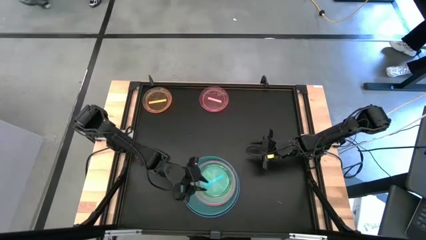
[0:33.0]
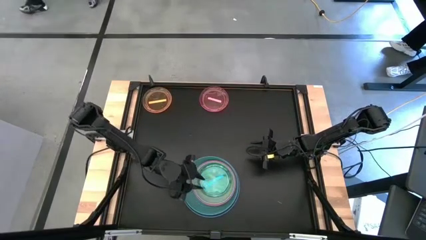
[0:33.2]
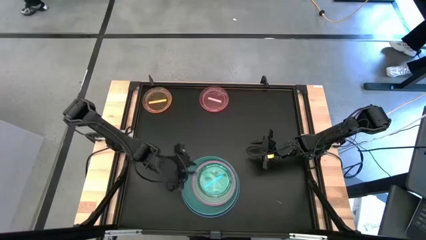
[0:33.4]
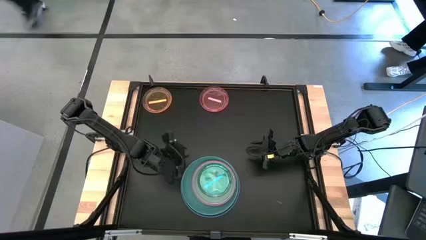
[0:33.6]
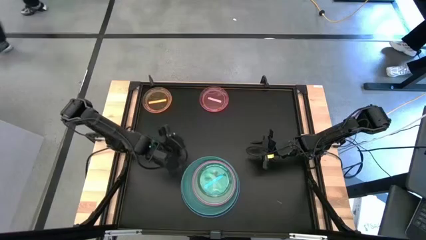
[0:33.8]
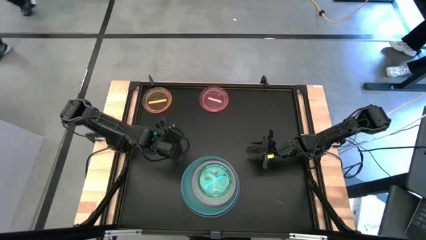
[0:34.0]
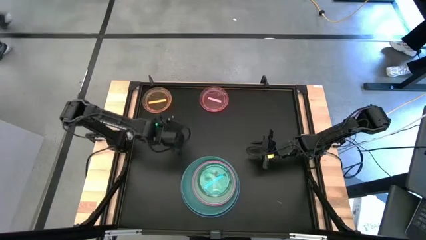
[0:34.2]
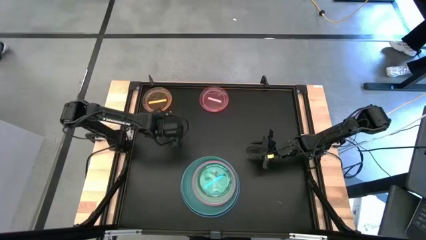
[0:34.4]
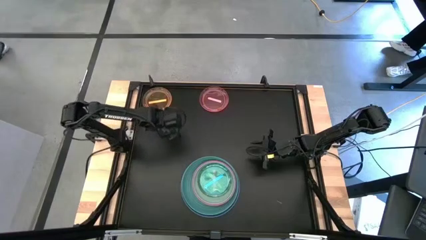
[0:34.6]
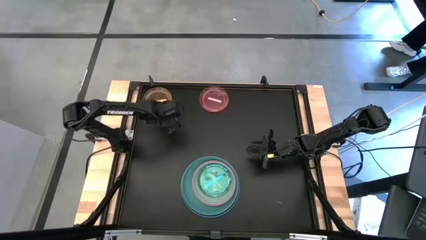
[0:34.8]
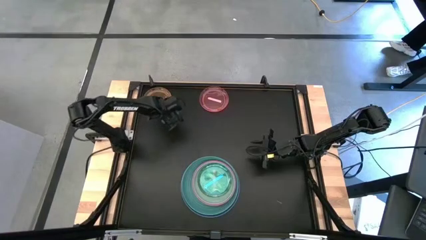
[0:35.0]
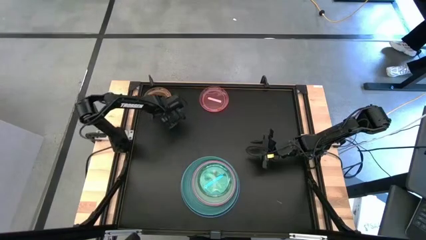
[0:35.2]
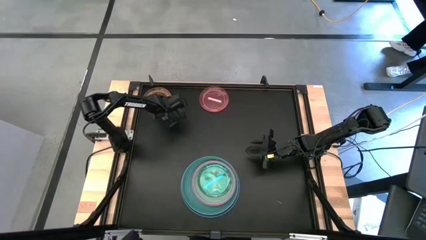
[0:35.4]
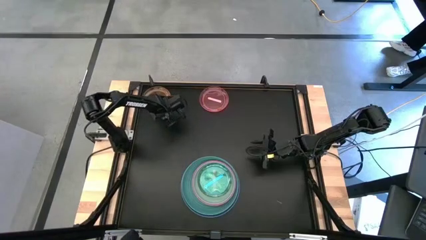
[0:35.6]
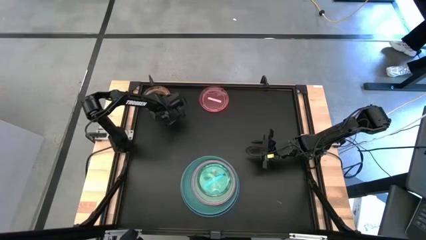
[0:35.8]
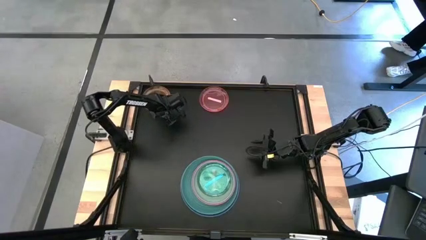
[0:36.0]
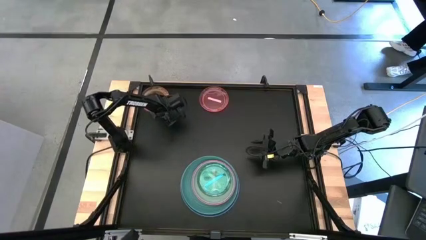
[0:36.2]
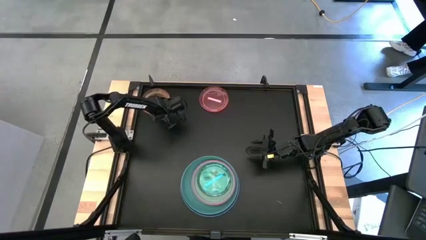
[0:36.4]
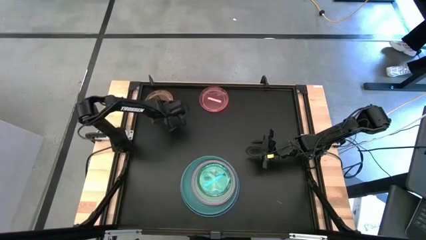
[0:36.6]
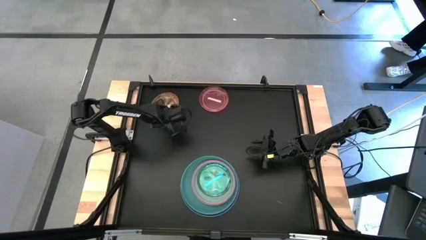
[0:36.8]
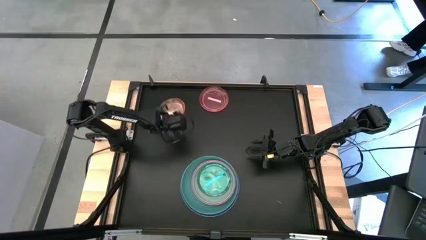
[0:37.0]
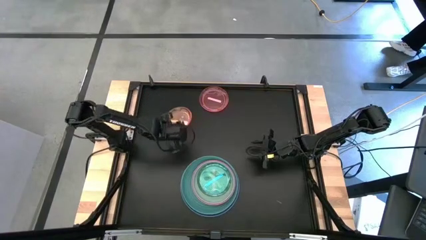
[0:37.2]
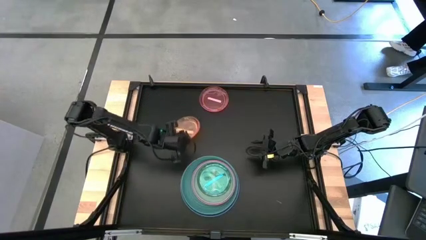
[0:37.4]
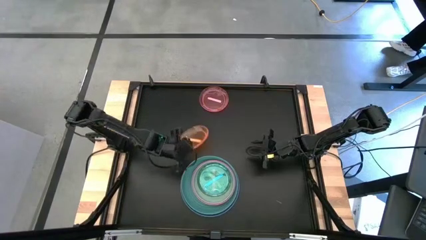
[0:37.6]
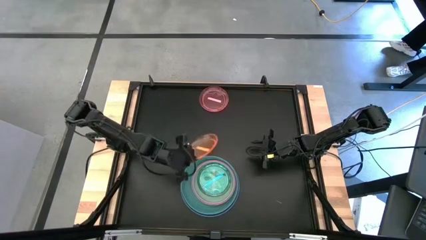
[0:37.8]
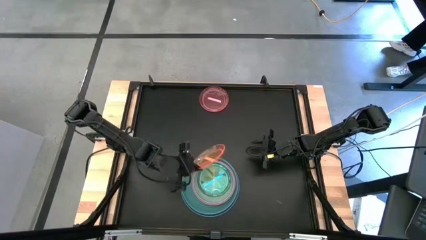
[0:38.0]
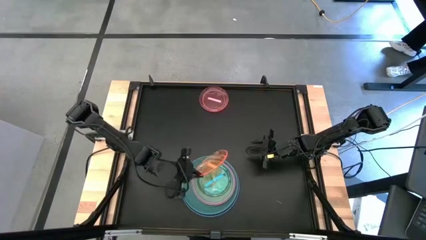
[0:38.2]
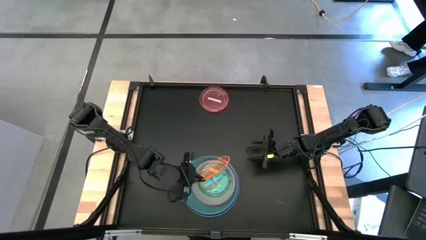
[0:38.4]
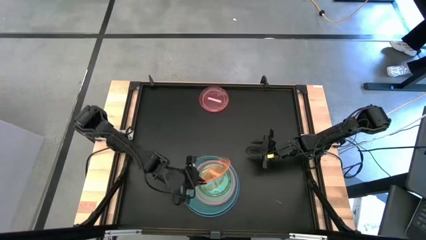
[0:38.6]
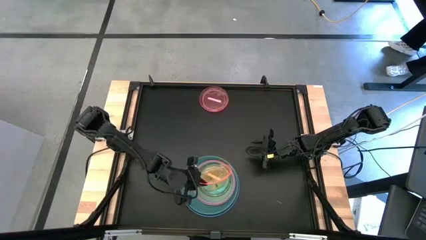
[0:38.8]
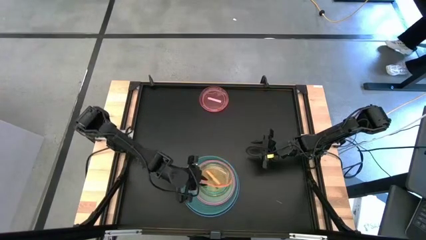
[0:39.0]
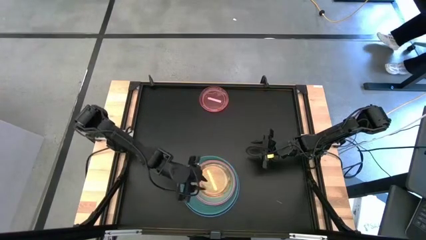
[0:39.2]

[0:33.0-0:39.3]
Task: Stack plastic plates
Stack the orange plate on top of the small light blue plate

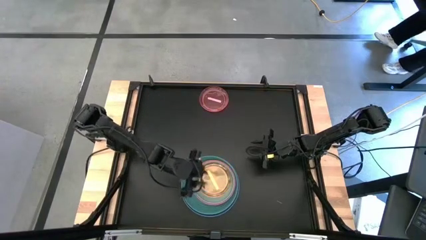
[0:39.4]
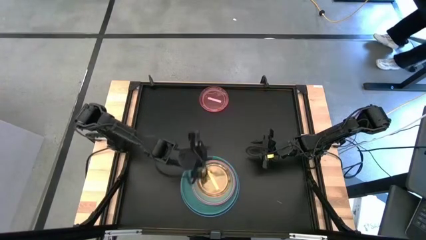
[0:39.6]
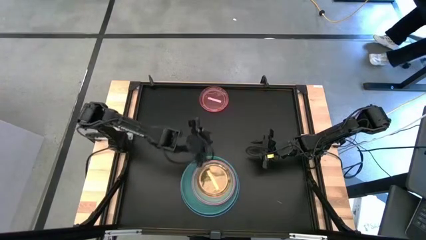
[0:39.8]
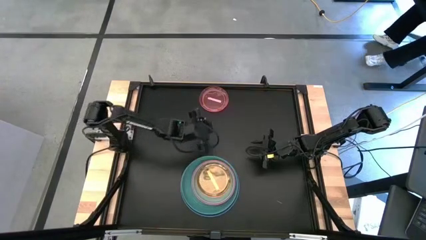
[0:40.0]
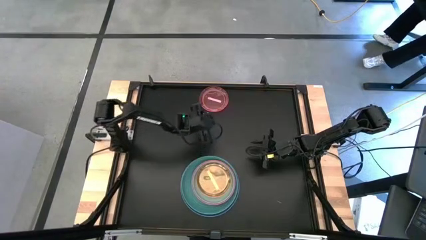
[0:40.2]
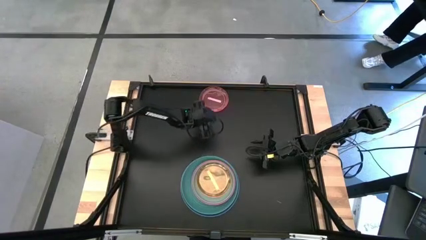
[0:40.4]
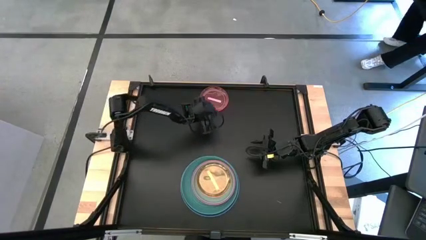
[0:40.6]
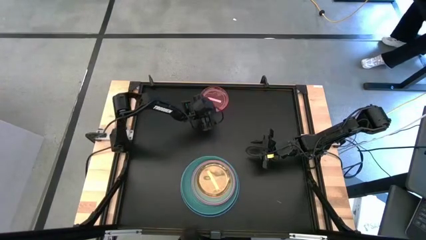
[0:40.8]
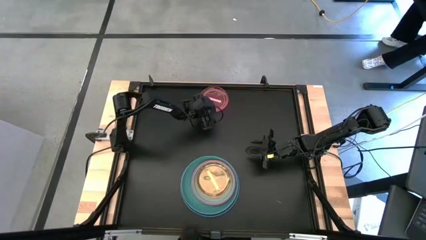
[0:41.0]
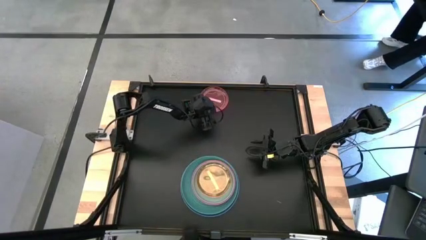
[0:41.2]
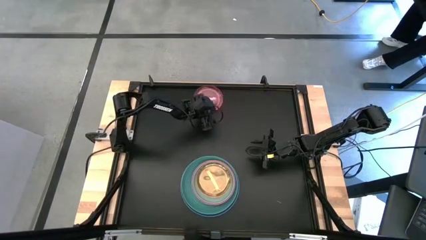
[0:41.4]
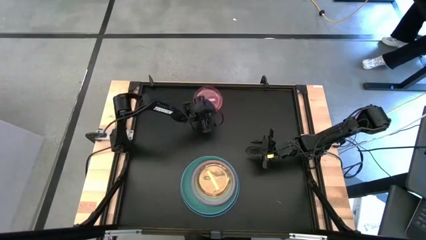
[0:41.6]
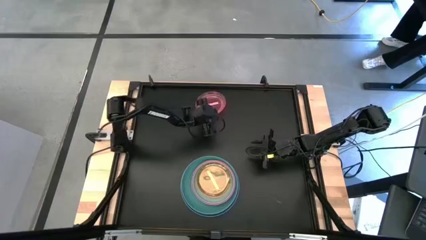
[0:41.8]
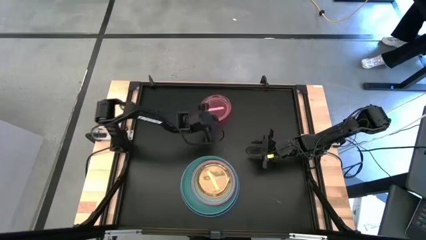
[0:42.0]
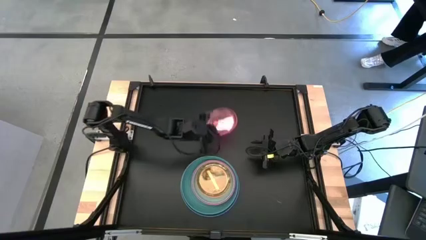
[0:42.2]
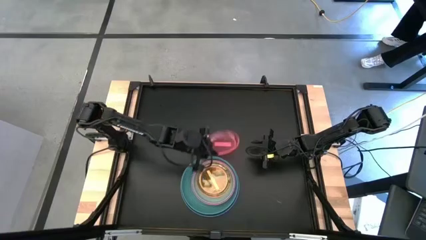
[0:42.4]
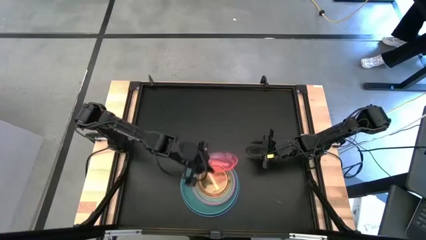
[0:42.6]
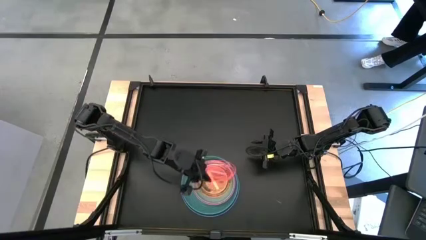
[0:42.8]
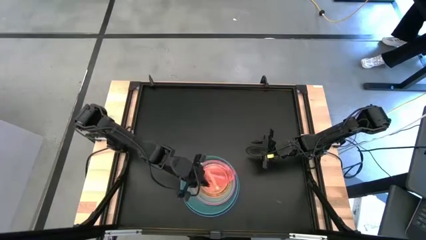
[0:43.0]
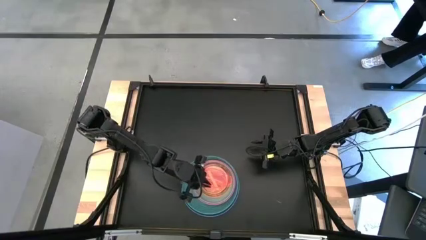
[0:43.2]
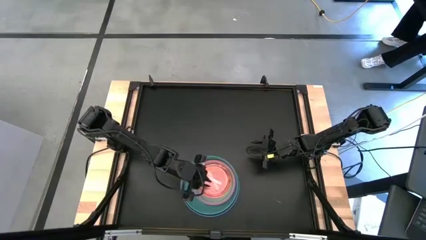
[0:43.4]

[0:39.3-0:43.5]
Stack the light pink plate on top of the orange plate

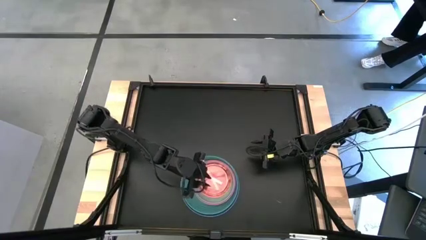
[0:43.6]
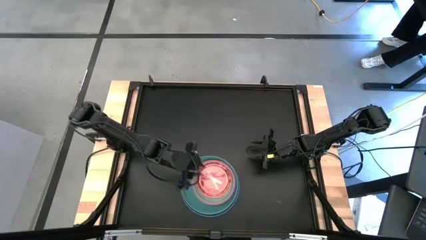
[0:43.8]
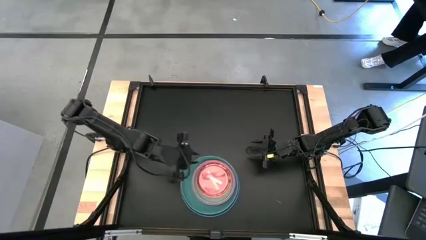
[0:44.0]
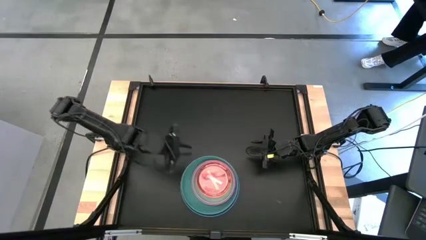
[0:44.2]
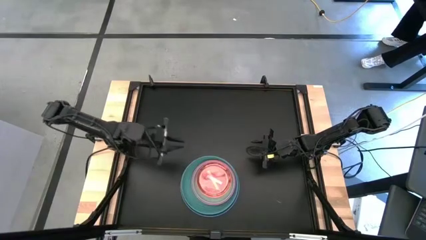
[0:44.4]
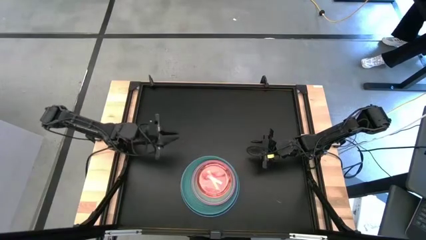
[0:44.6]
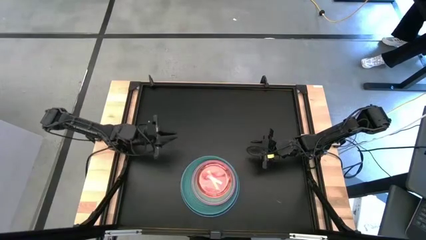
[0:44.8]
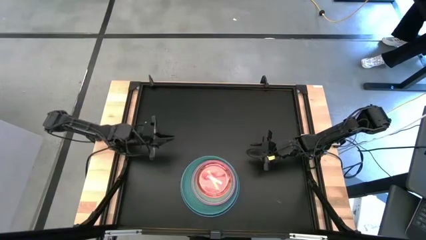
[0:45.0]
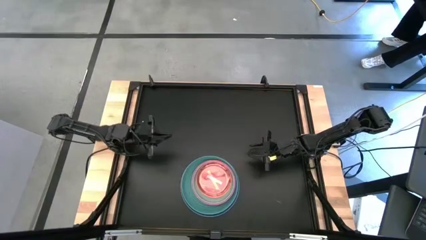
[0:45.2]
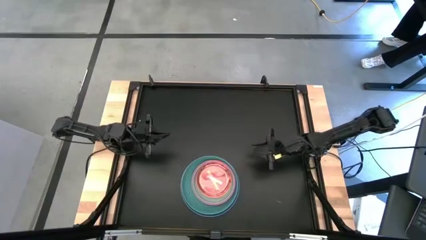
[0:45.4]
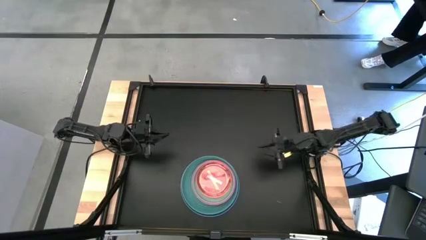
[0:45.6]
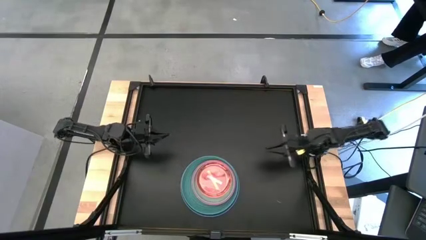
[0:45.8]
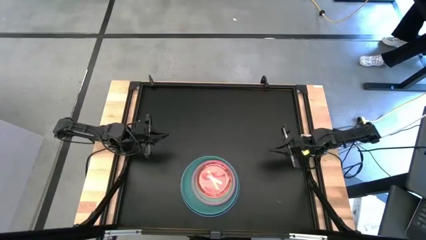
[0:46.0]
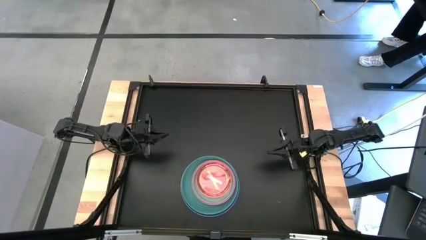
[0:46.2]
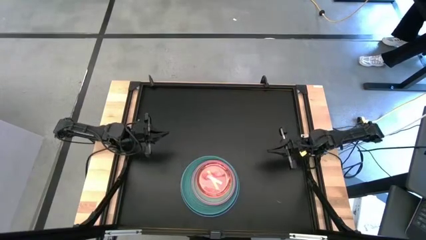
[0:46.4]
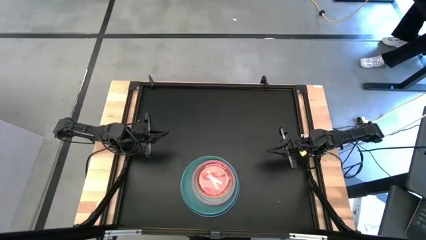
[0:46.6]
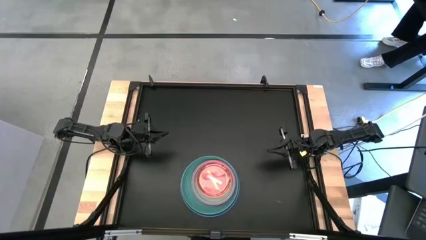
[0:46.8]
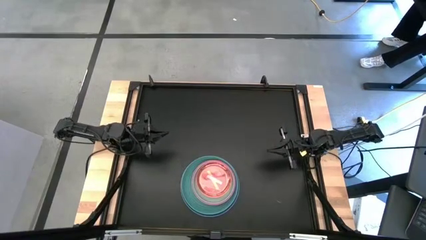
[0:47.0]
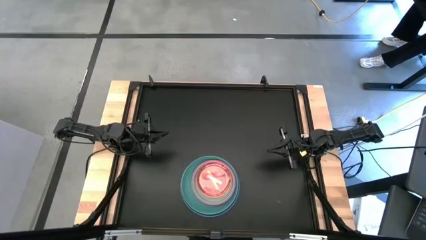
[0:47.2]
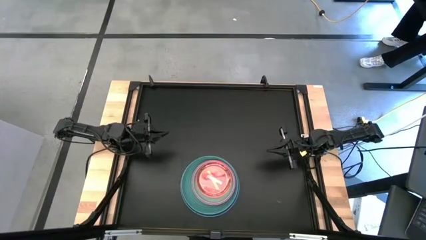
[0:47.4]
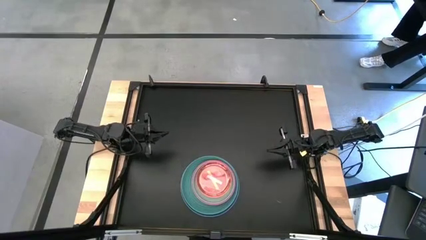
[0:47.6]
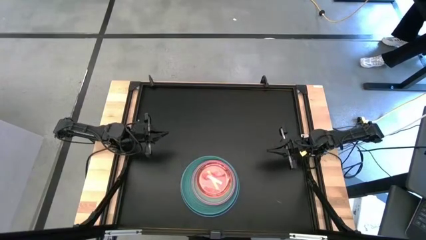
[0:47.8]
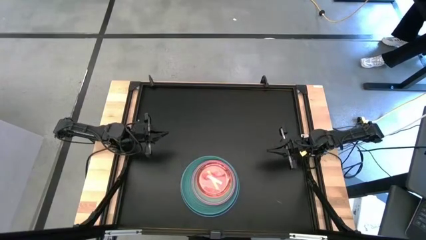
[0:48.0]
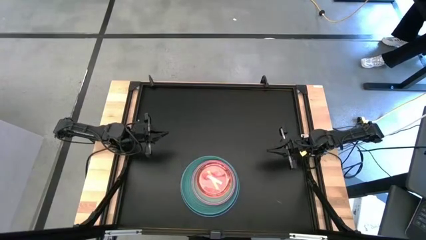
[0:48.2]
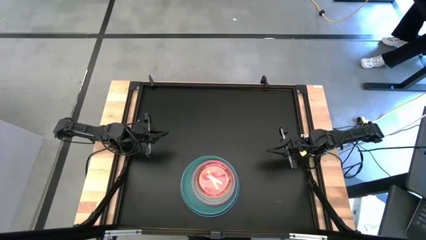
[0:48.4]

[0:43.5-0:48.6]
Return to Home Position

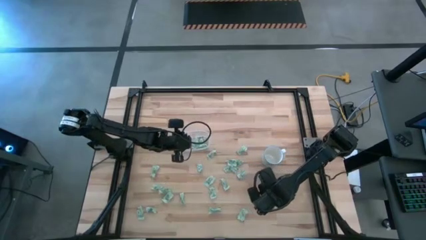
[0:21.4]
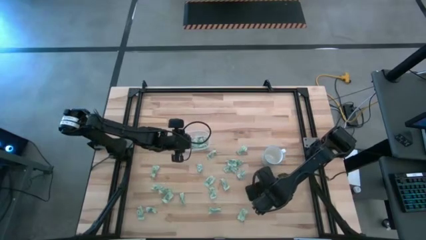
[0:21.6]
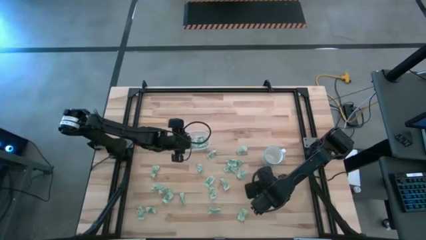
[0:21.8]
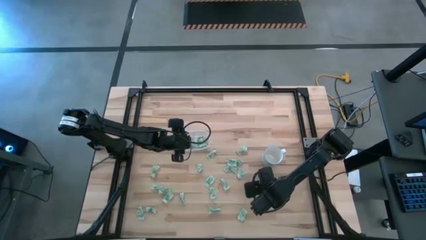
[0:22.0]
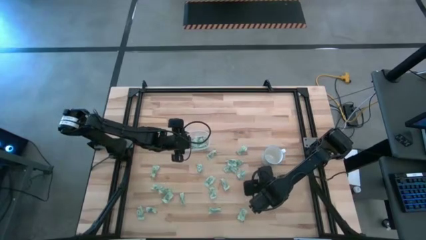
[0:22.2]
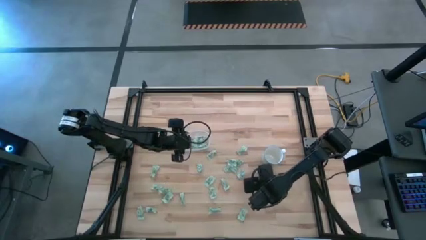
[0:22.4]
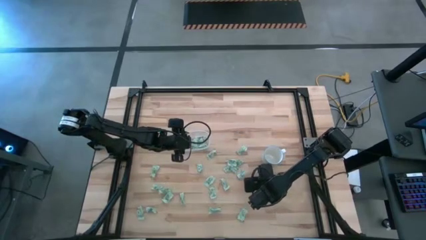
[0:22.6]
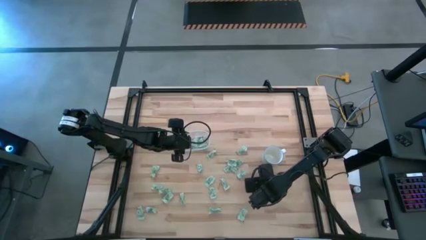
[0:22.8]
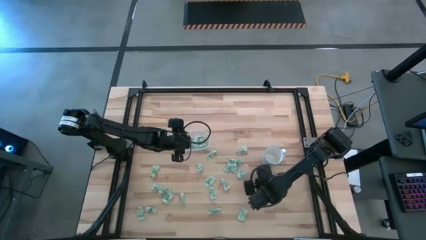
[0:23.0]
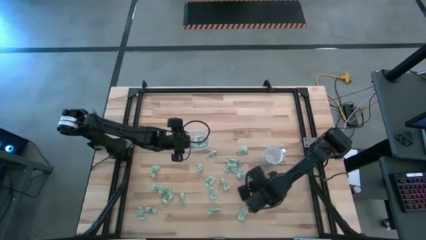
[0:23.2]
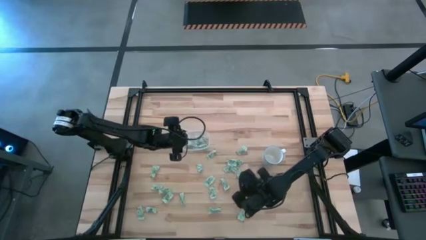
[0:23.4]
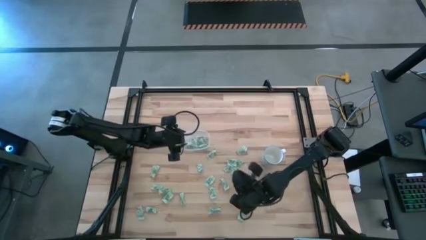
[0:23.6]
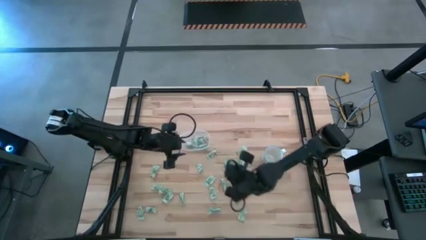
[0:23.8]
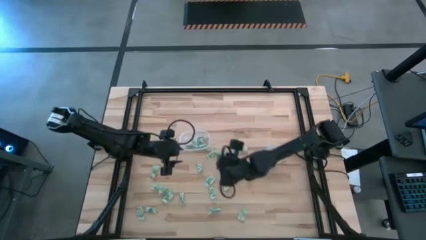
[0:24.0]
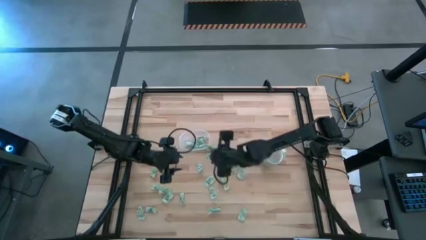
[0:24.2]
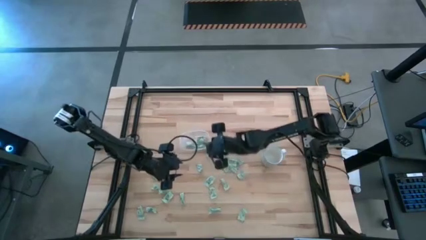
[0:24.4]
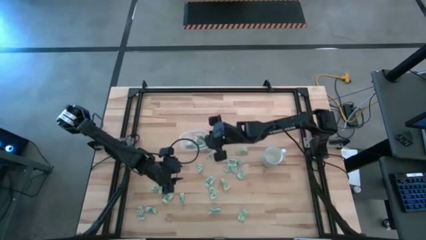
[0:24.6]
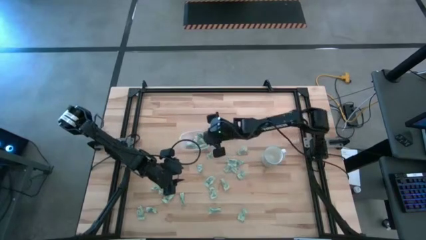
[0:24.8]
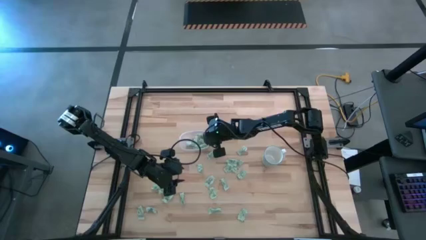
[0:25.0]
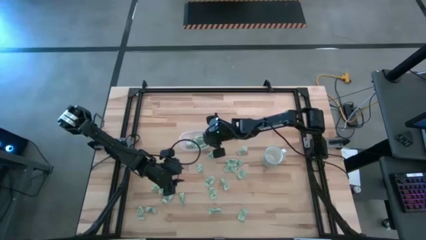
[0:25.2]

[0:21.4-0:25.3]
Task: Pick and place Stevia / Truvia into bins
Put the stevia packet into the transparent bin
